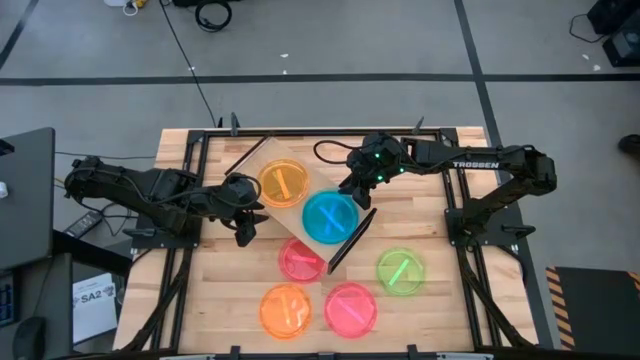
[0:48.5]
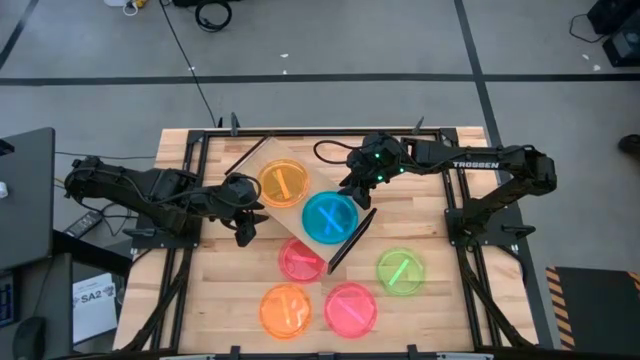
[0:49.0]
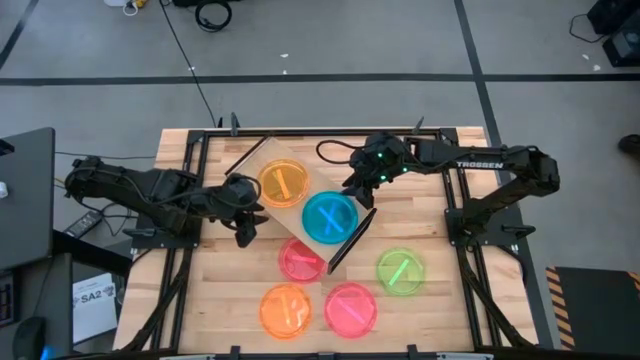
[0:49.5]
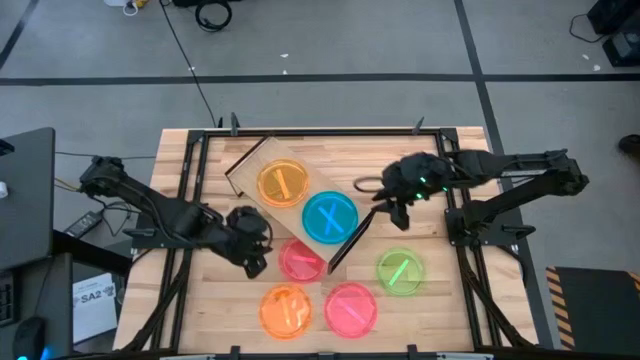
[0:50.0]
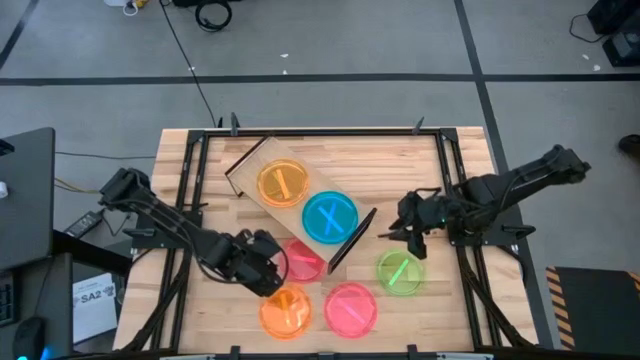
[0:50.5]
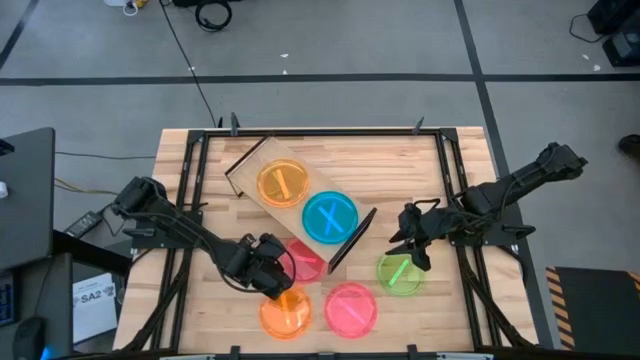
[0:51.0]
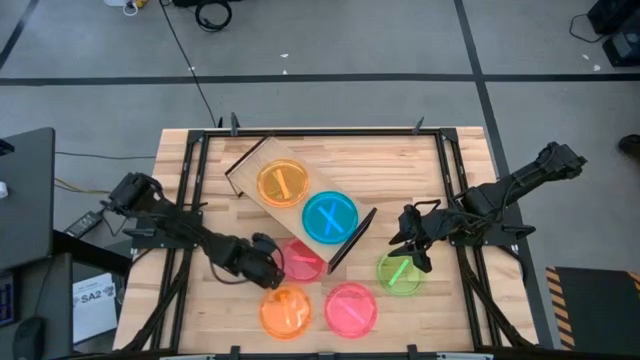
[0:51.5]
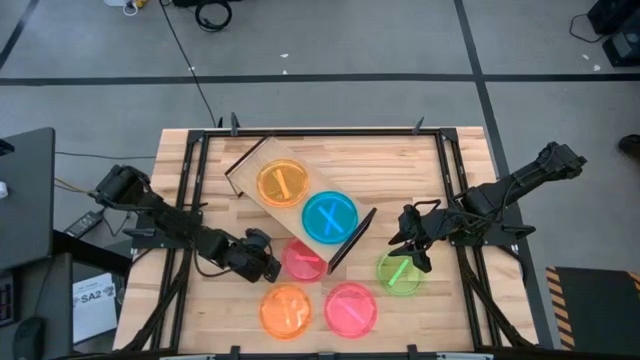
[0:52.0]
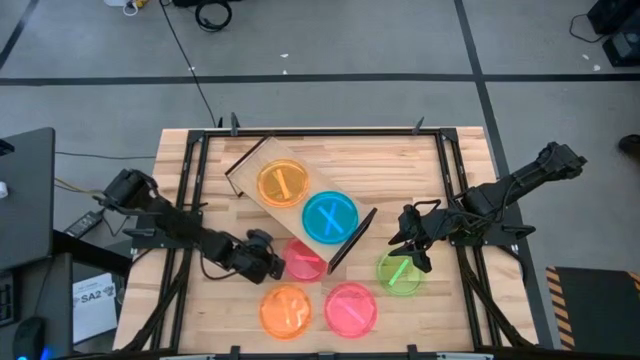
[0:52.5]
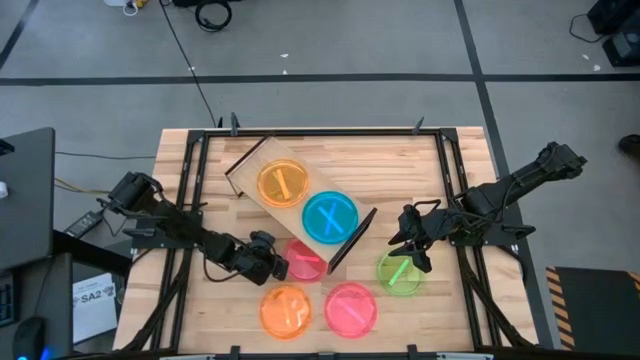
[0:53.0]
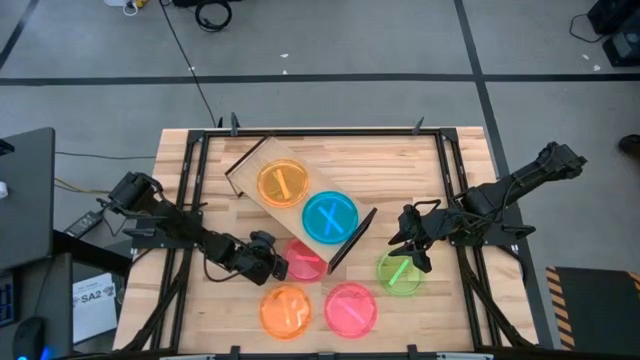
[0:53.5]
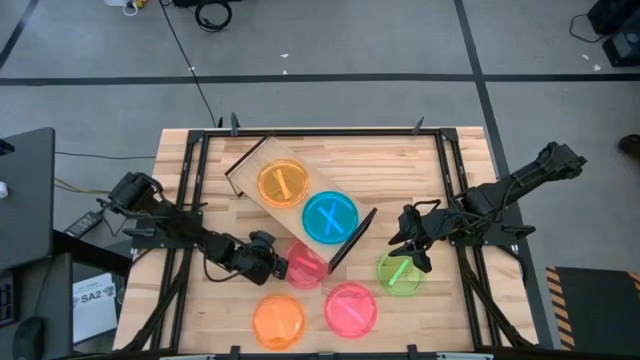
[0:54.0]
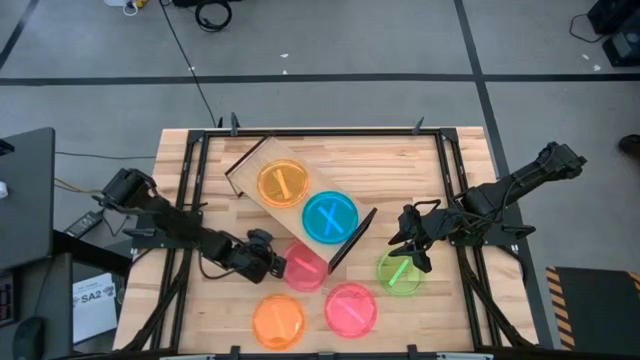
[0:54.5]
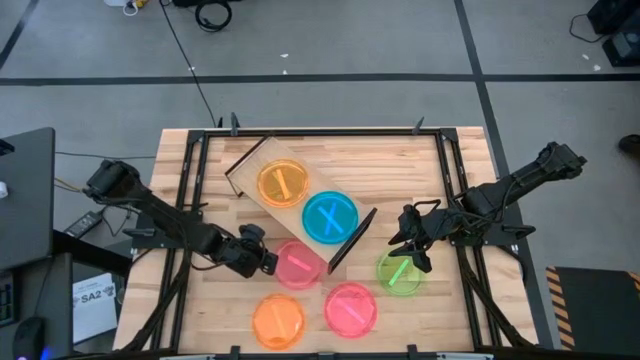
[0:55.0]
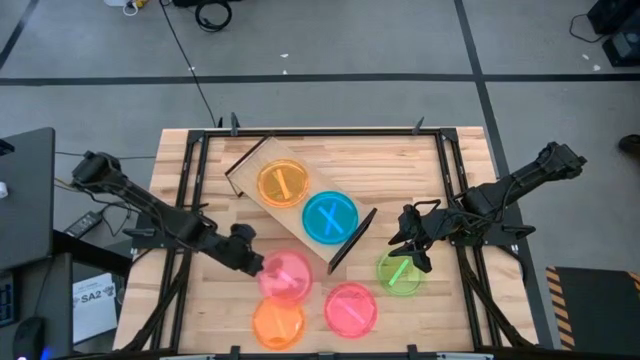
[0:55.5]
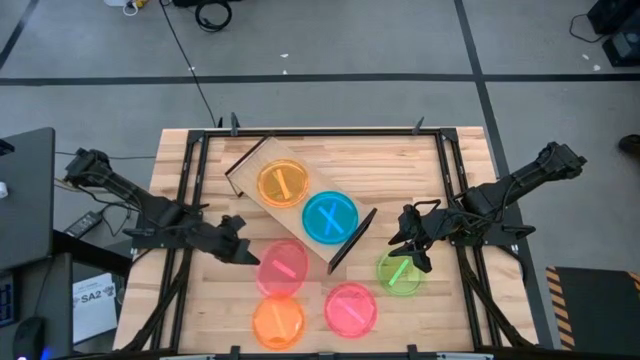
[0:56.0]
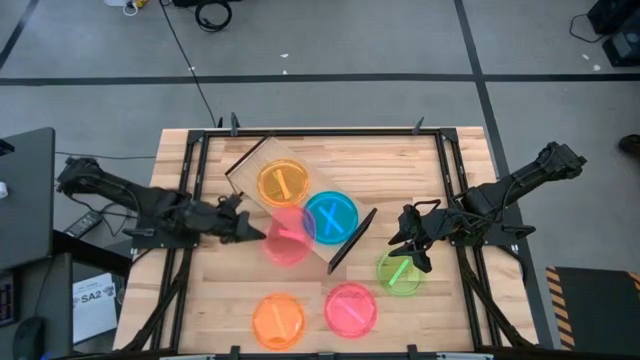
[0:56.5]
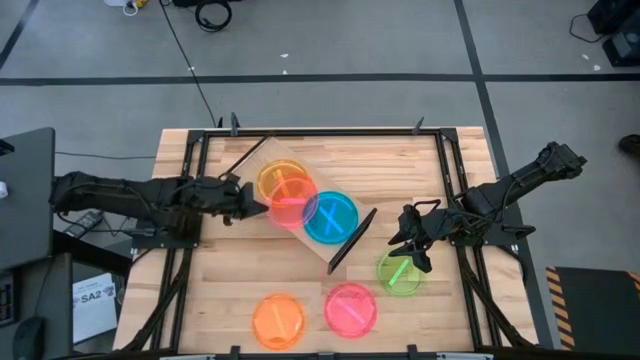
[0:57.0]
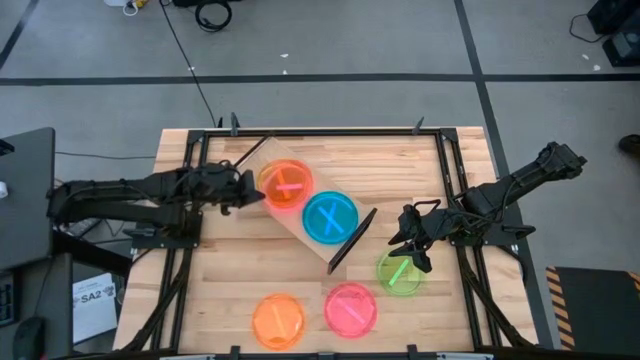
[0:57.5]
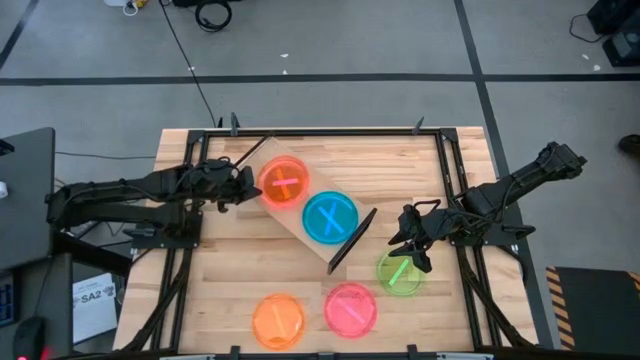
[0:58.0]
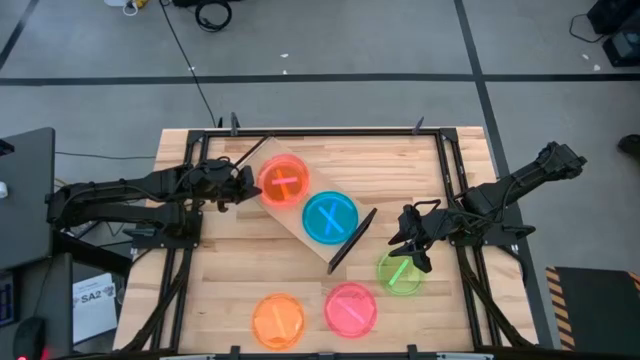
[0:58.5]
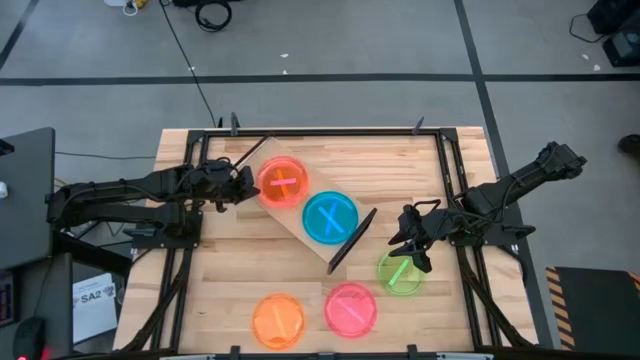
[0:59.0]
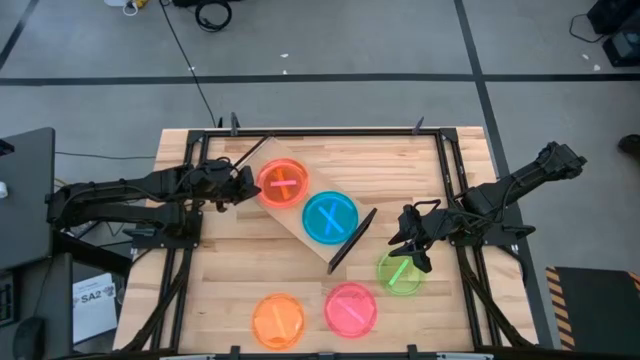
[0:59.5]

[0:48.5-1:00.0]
Task: Place and stack plates onto a shelf
Stack the top pink plate on top of the orange plate on the shelf

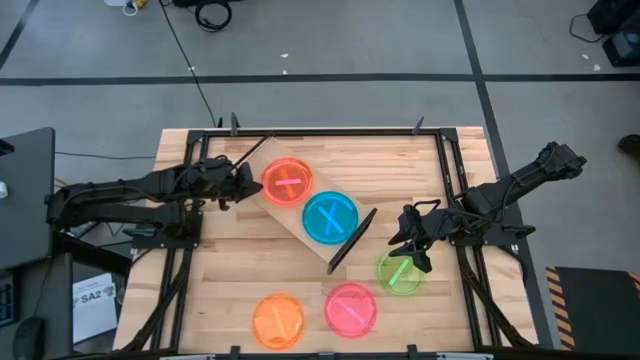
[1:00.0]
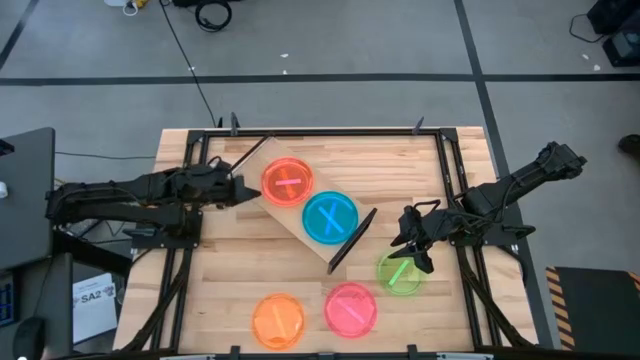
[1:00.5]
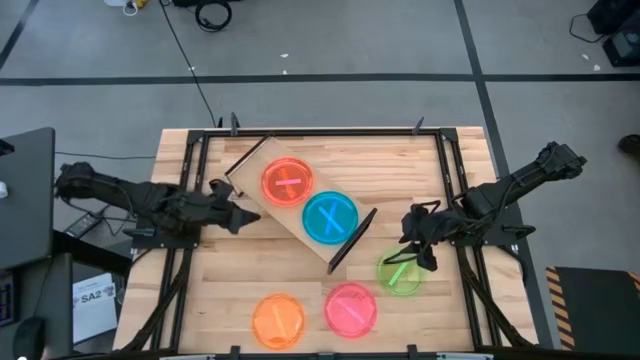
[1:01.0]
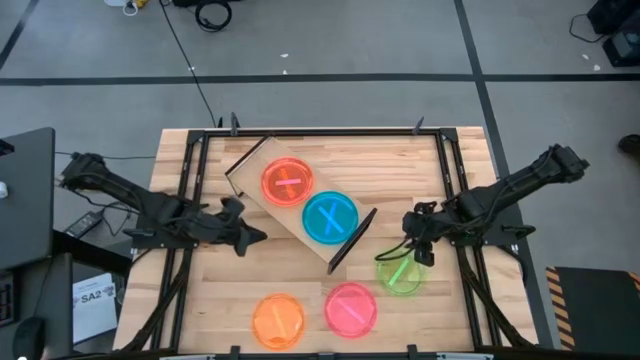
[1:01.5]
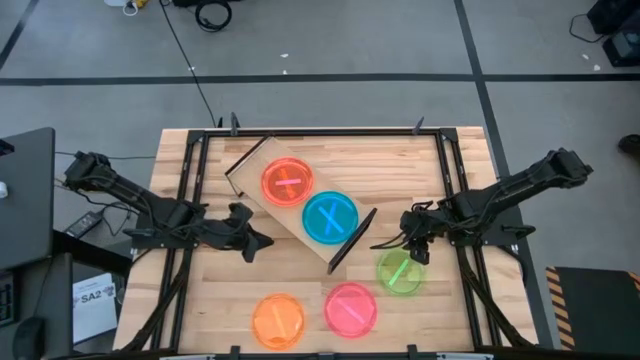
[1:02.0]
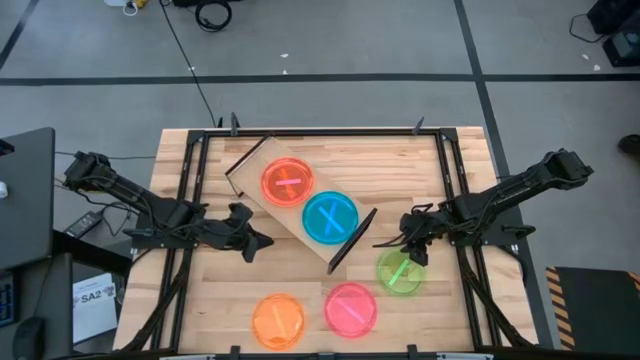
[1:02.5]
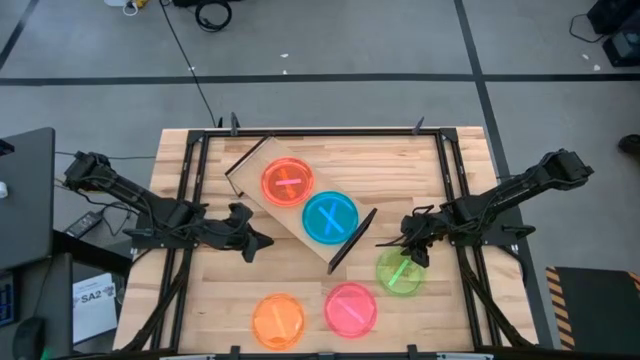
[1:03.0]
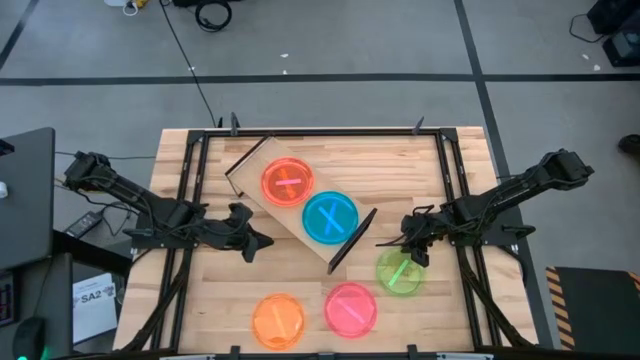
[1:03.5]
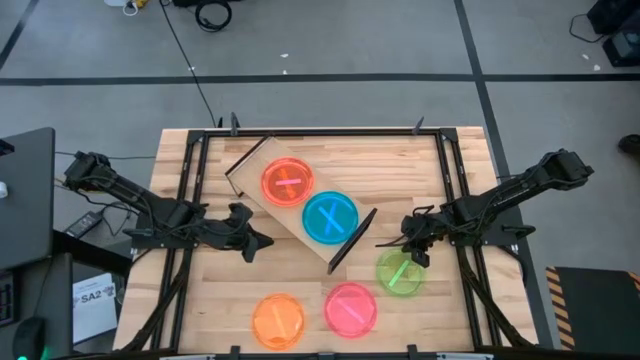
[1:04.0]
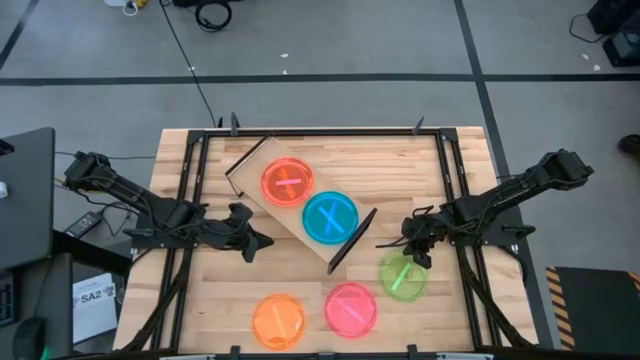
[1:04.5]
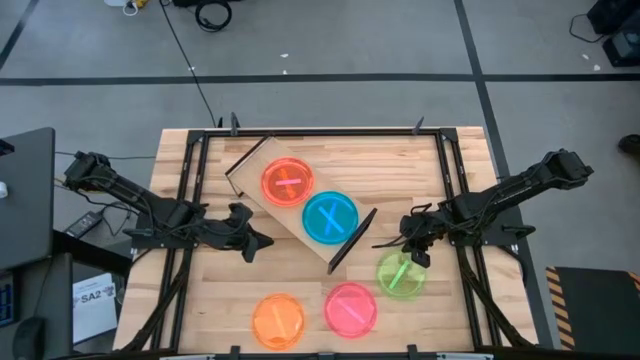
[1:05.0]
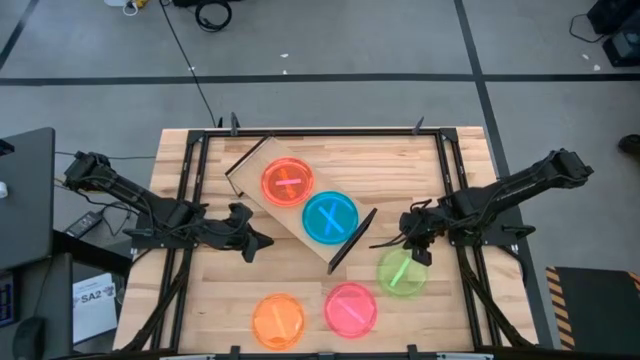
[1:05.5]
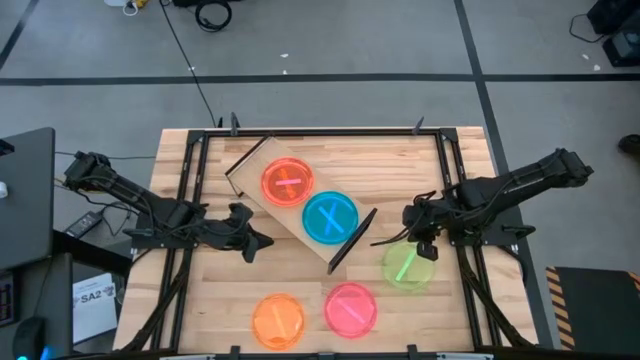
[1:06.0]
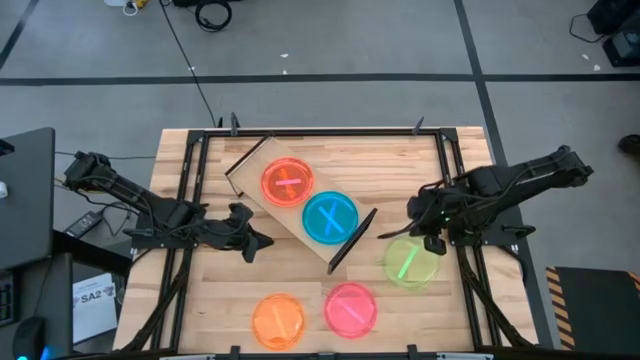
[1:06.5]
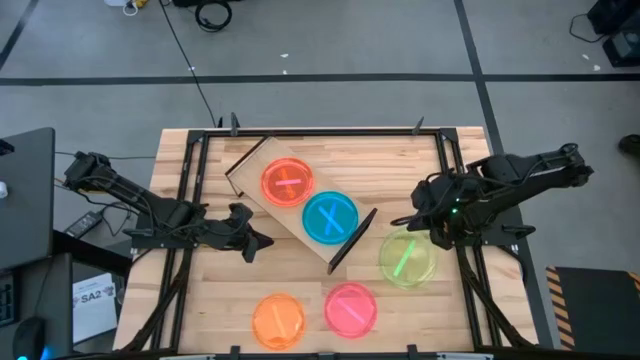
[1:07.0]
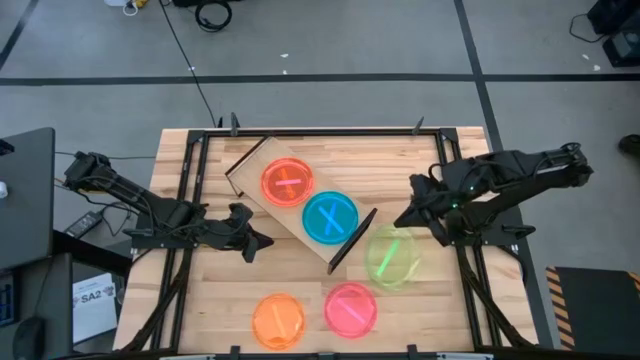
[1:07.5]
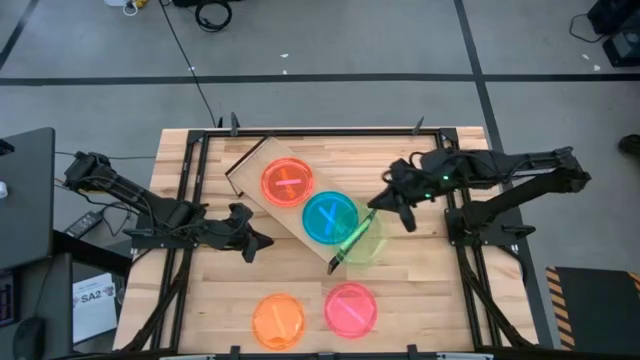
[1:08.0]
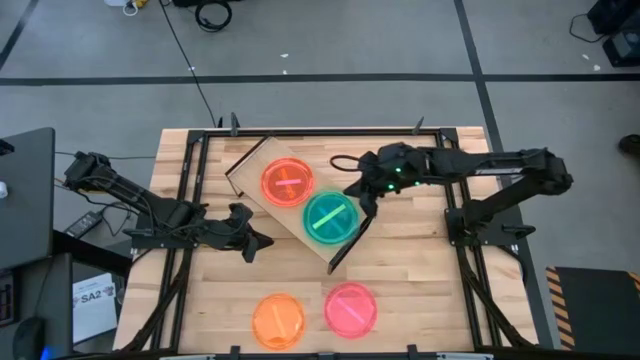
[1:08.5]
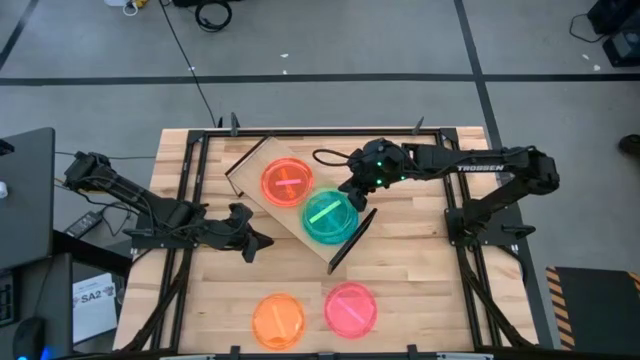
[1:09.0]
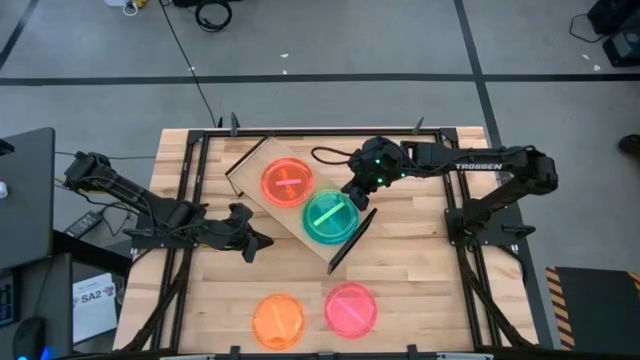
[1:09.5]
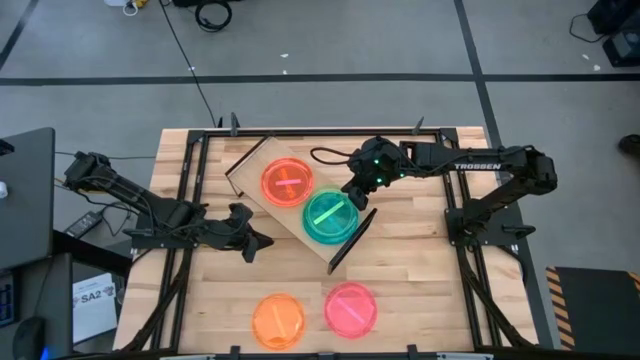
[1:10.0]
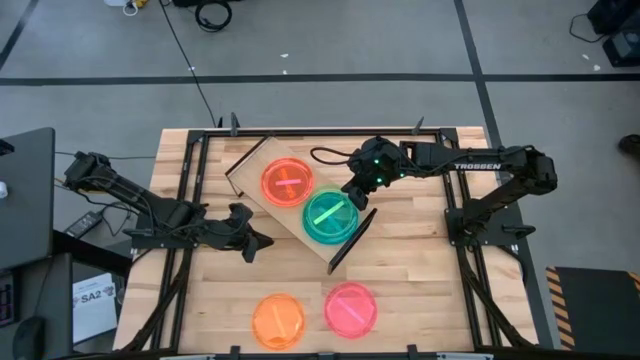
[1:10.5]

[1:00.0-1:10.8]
Stack the green plate on top of the blue plate on the shelf

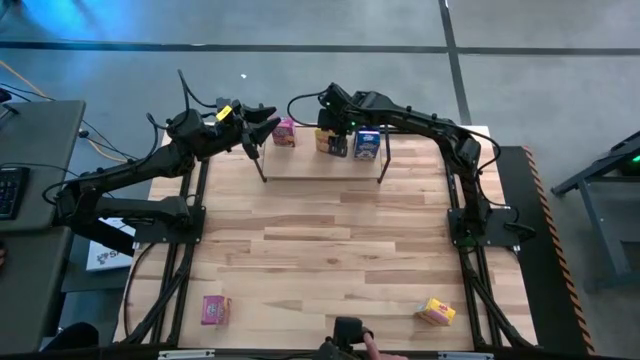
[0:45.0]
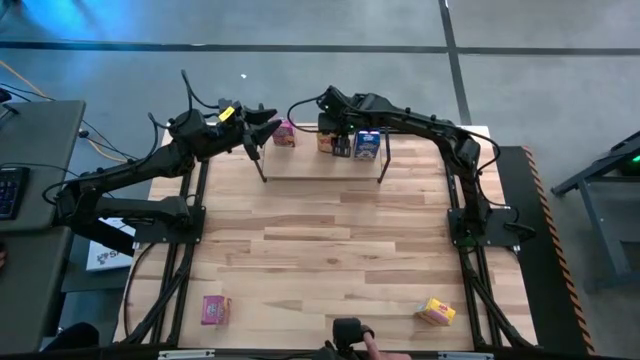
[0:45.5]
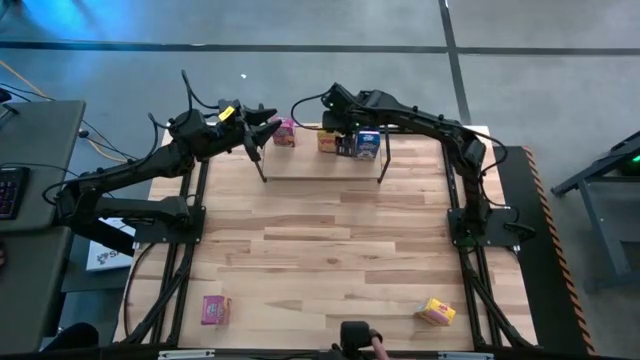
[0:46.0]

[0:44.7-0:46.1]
Task: Stack cereal on shelf
Adjust the yellow cereal box on the shelf
